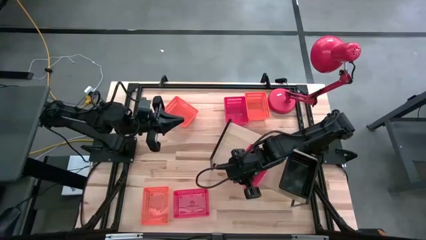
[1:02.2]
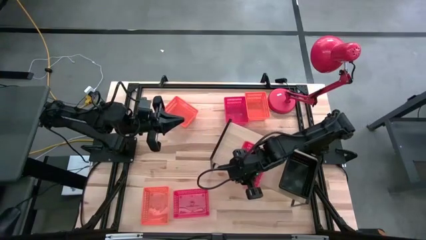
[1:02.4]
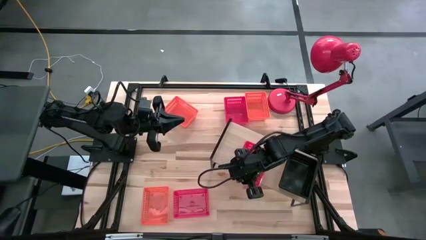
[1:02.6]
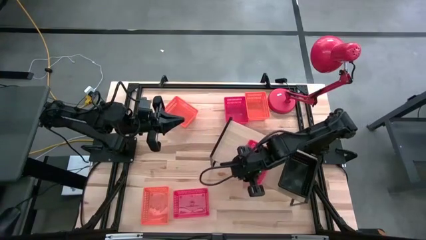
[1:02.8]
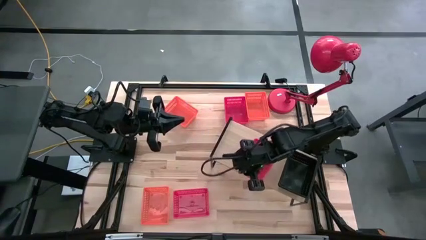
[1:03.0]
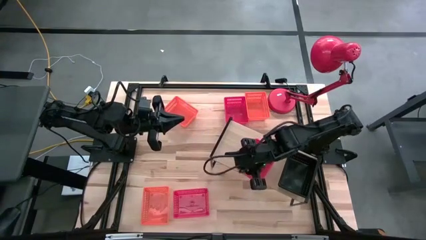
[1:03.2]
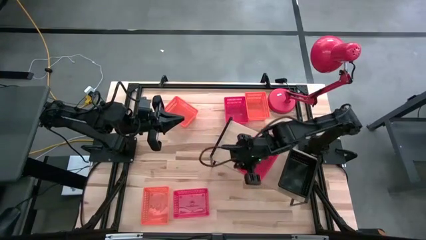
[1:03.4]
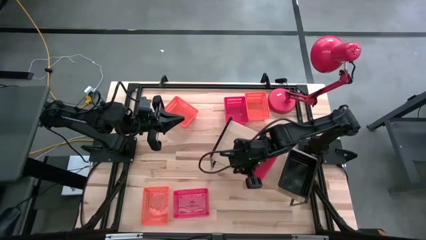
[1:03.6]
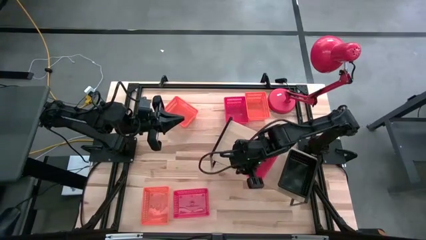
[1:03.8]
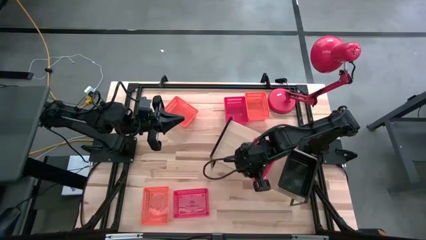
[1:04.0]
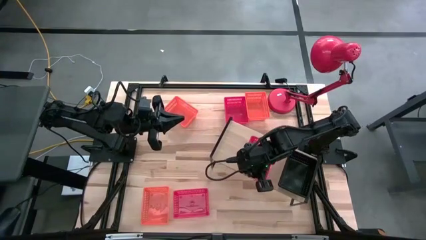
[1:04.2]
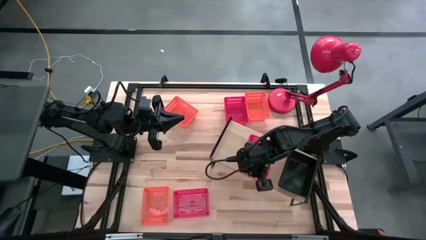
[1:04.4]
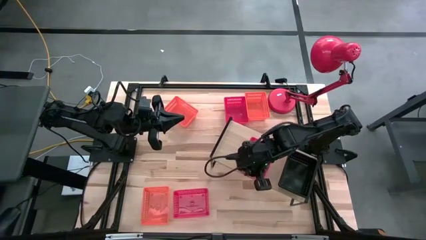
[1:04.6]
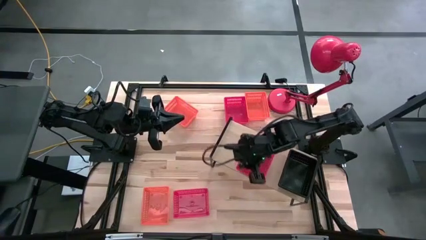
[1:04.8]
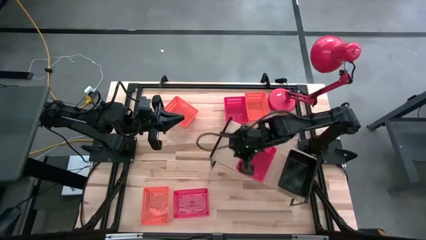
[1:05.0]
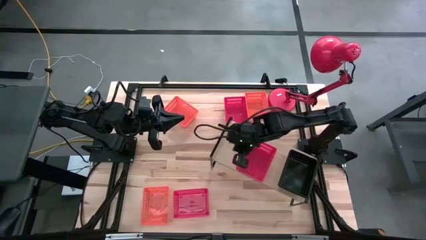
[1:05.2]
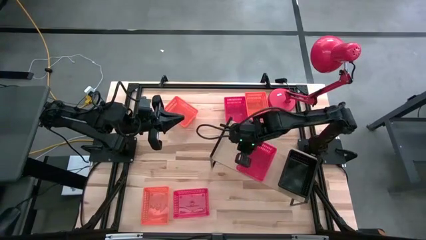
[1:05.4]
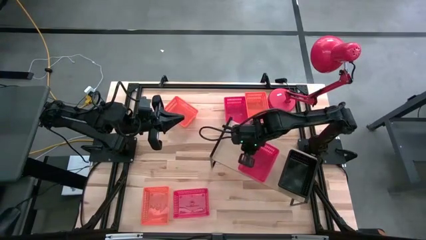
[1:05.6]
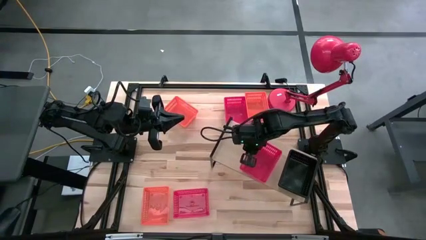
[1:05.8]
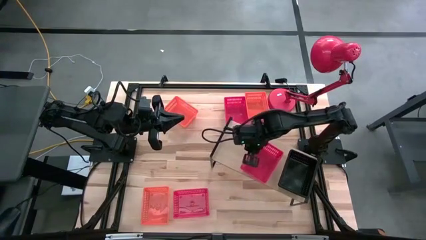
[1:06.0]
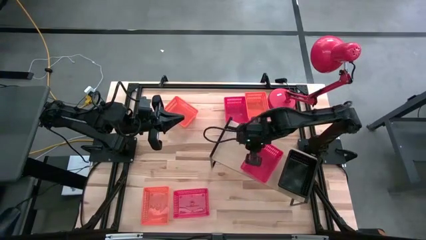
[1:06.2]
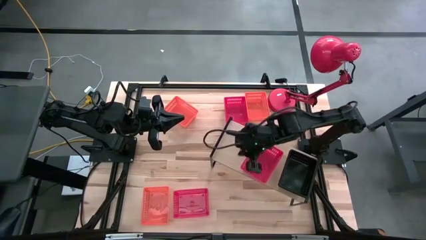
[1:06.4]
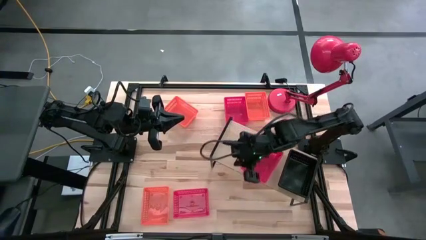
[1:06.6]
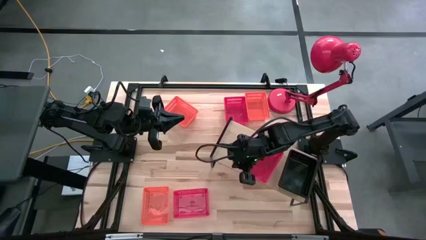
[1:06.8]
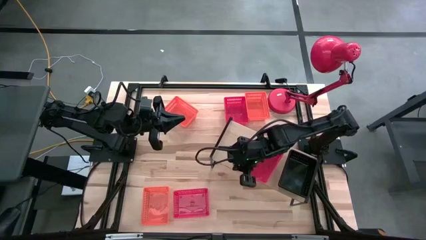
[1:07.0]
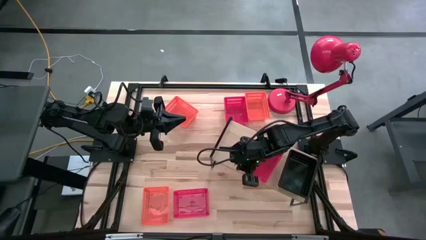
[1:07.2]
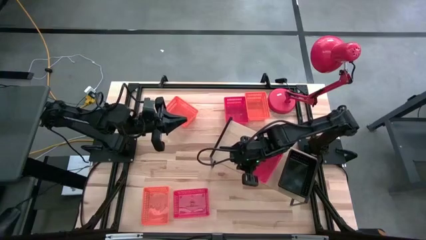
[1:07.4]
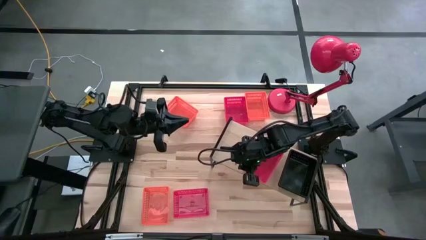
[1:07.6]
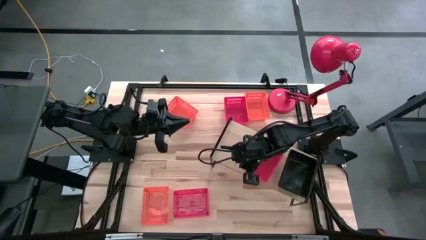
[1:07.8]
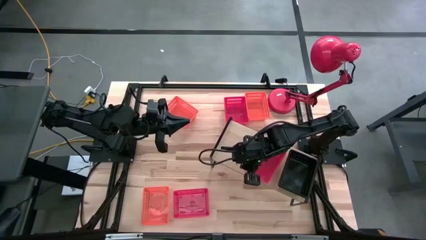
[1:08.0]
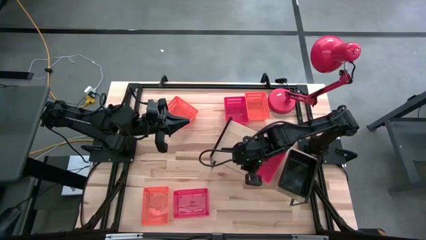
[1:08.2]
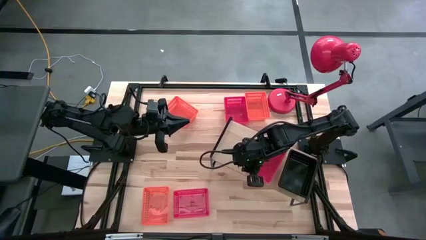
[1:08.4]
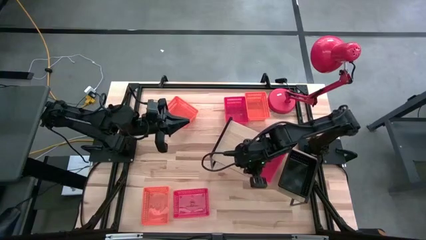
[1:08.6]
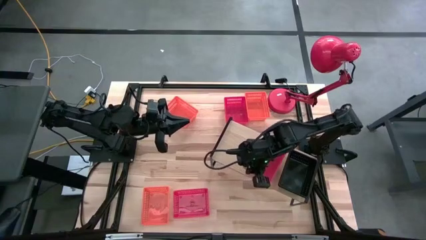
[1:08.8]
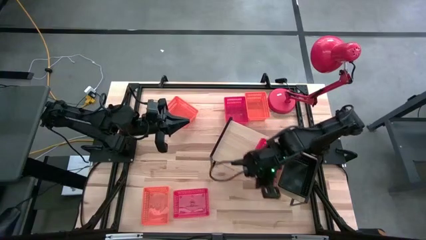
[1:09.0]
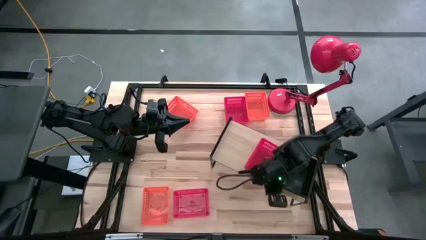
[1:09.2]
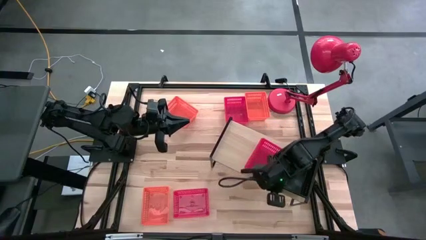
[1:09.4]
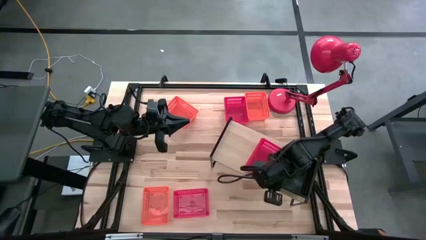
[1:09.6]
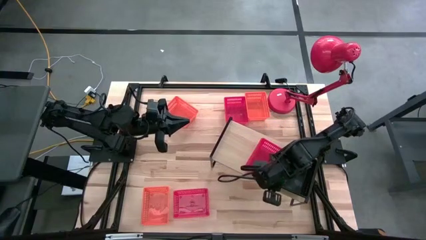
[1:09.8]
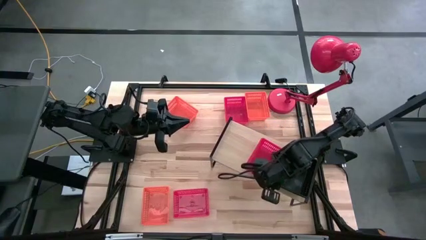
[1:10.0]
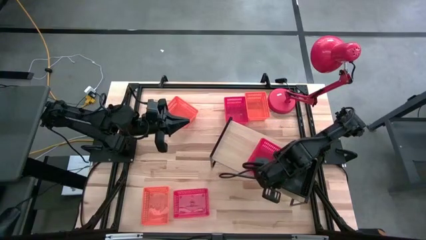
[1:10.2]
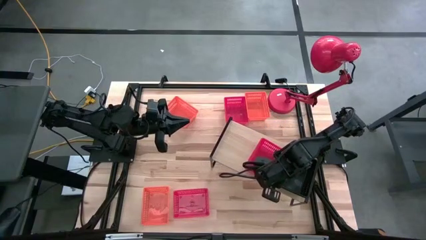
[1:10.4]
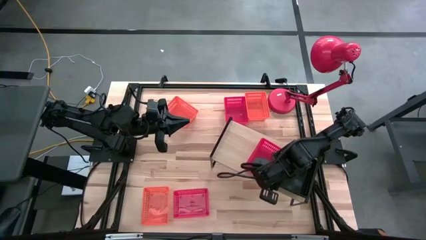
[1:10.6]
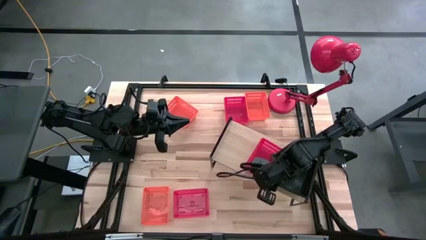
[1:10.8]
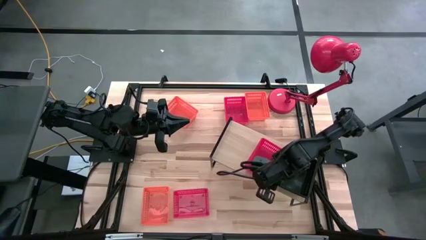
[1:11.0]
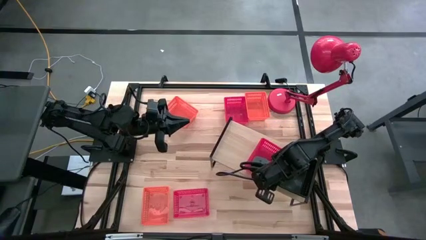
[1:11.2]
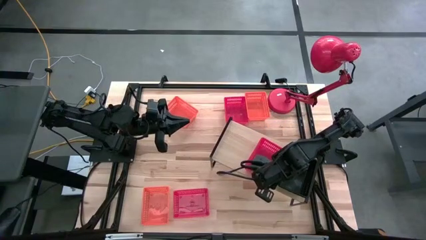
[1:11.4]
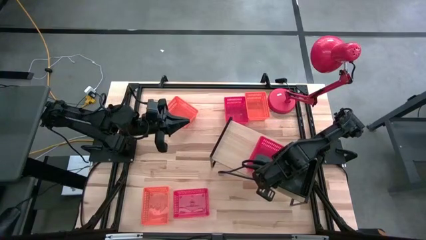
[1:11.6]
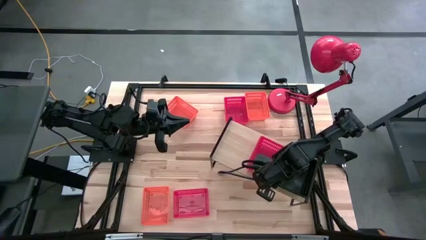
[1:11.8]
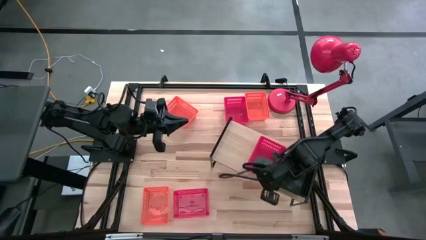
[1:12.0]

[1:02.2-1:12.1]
Task: Stack baskets on shelf by color
Put the top left red bin on the shelf
